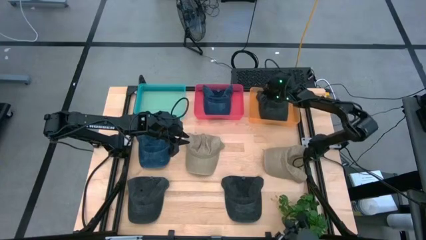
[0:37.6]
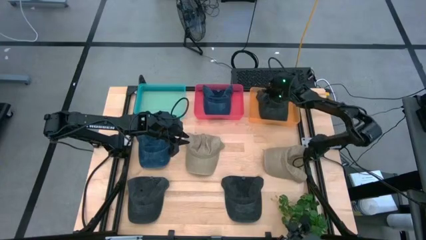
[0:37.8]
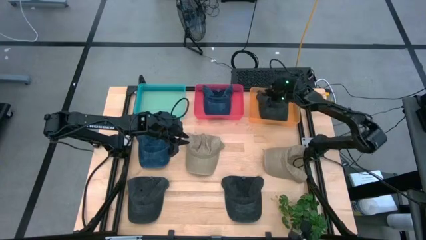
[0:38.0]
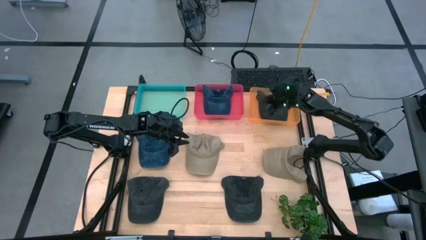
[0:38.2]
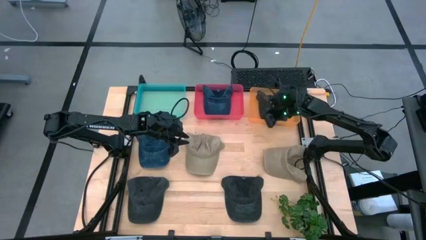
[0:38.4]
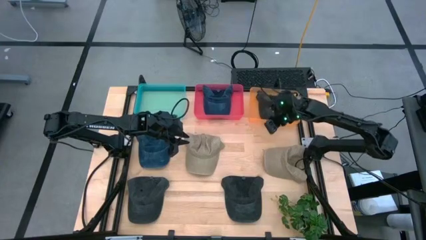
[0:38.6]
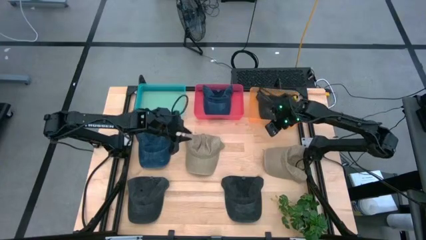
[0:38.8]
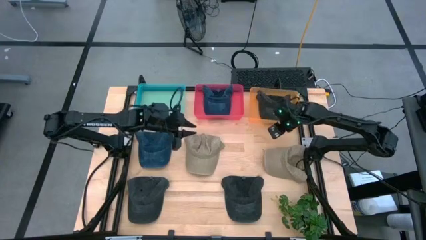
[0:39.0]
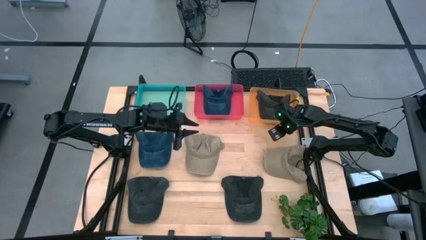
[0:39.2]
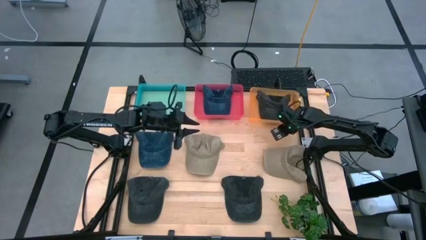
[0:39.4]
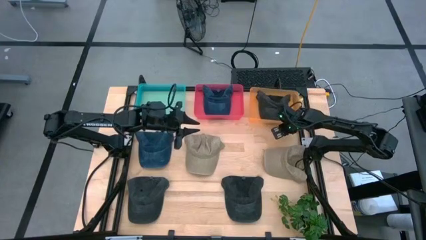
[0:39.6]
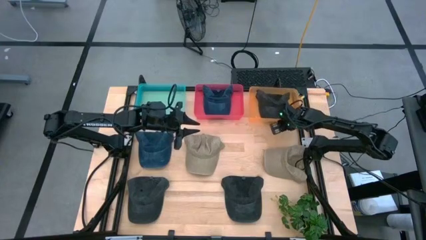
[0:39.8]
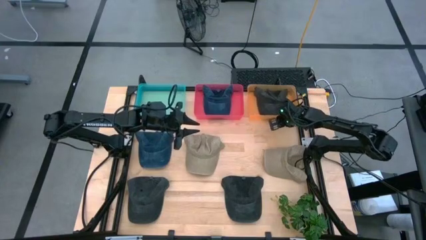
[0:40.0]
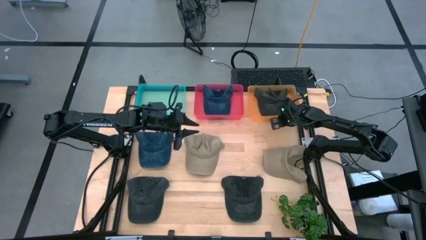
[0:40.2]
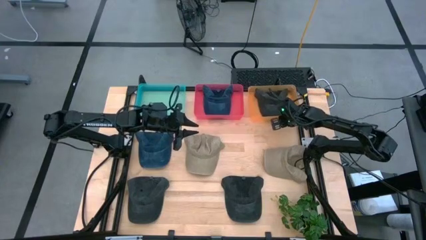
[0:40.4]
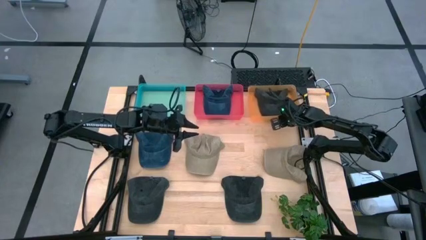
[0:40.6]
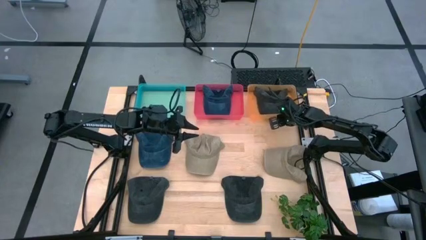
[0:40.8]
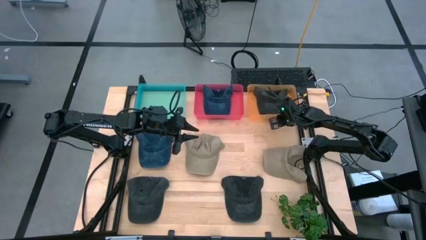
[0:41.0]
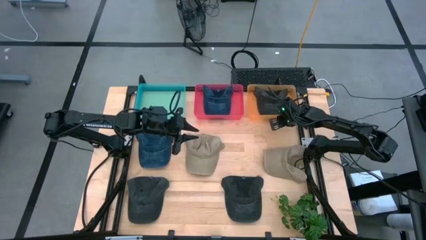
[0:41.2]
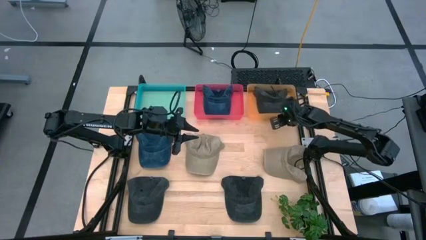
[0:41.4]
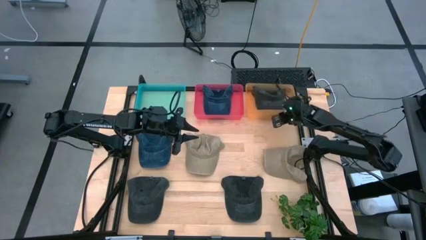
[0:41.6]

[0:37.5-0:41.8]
Task: Pick & Place hat
Adjust the orange bin

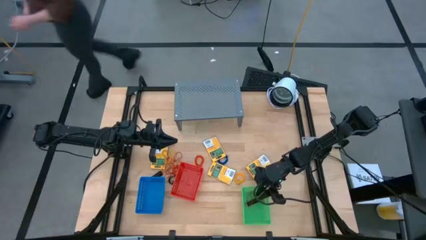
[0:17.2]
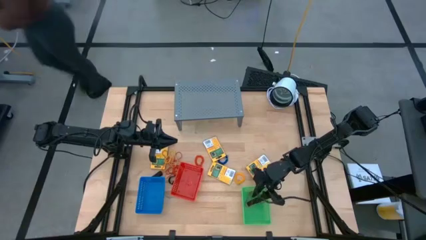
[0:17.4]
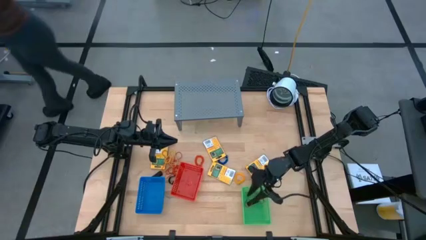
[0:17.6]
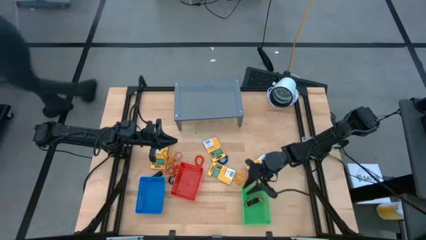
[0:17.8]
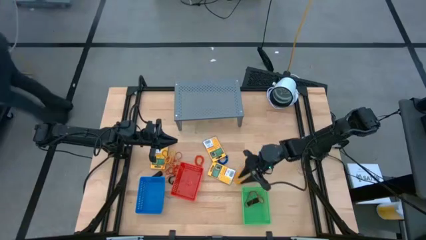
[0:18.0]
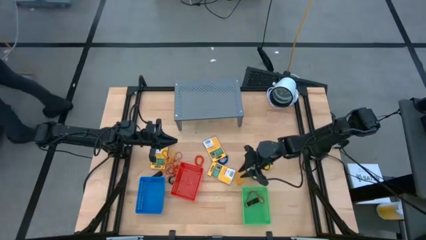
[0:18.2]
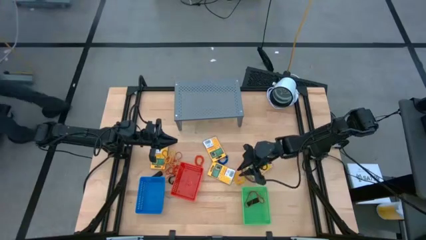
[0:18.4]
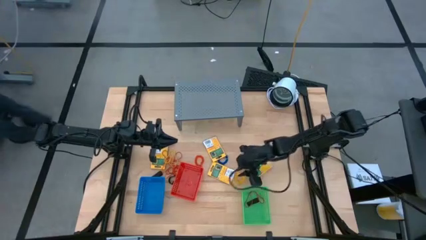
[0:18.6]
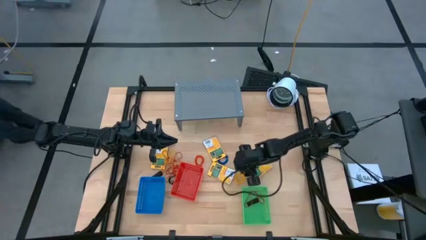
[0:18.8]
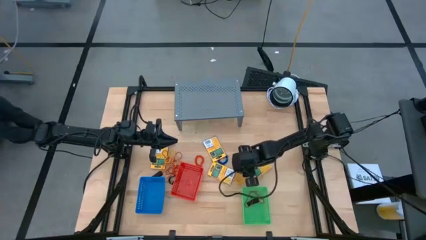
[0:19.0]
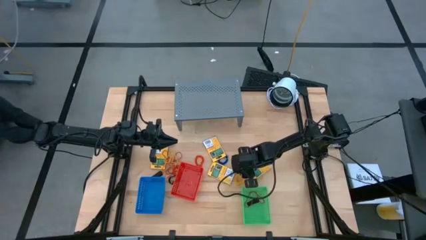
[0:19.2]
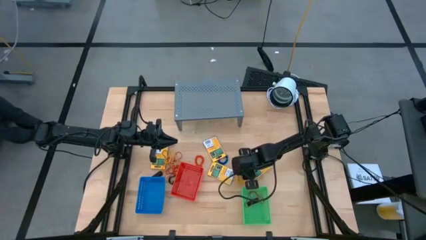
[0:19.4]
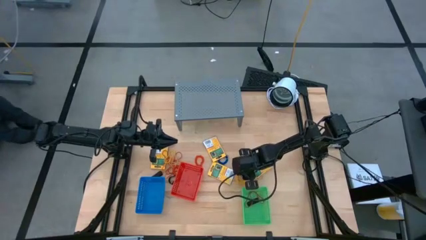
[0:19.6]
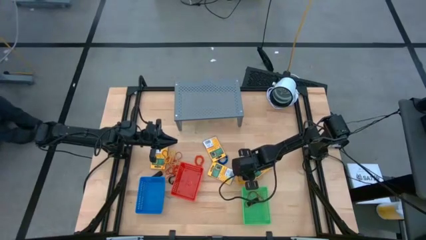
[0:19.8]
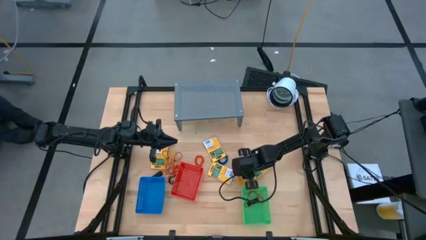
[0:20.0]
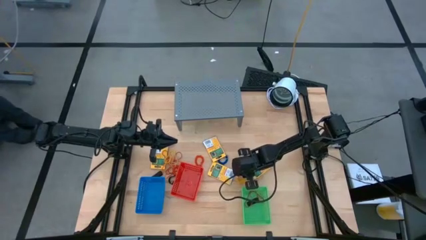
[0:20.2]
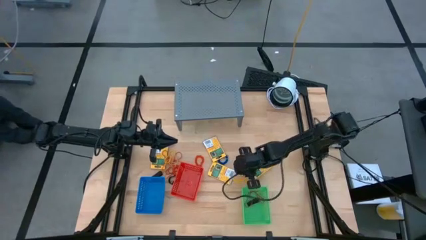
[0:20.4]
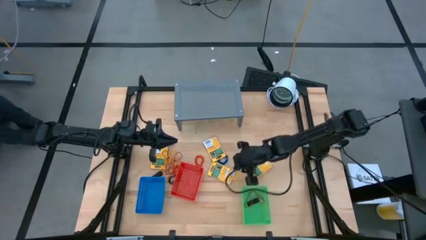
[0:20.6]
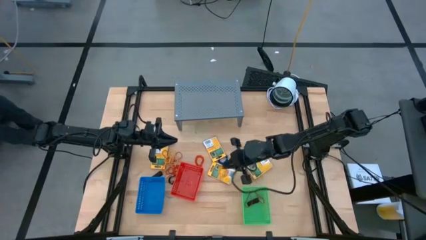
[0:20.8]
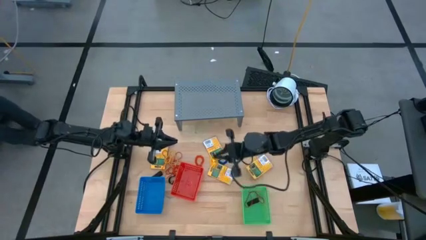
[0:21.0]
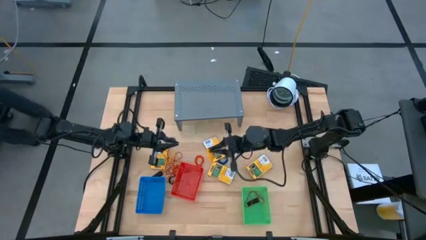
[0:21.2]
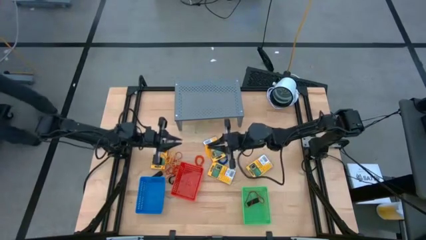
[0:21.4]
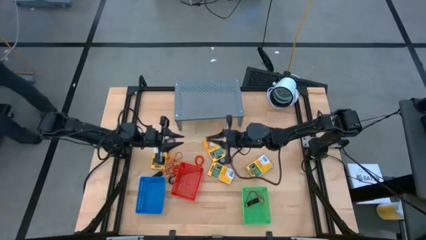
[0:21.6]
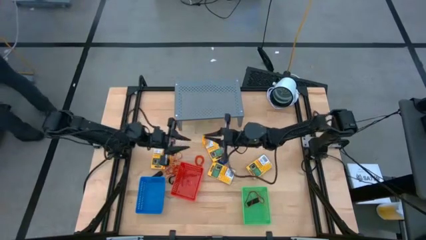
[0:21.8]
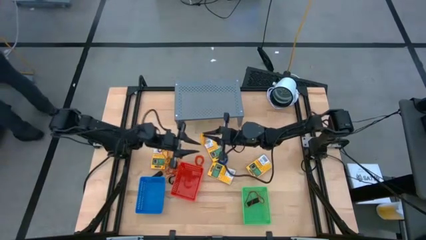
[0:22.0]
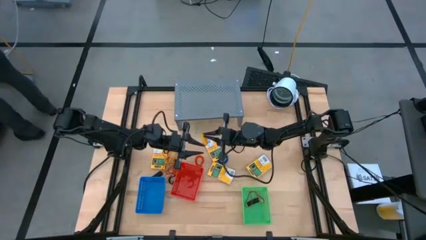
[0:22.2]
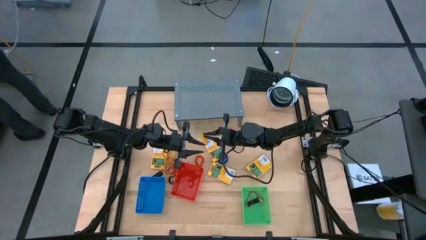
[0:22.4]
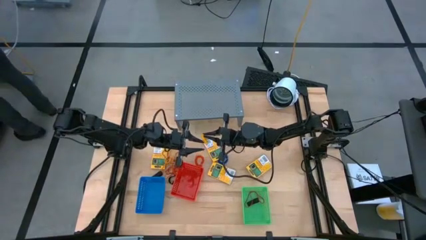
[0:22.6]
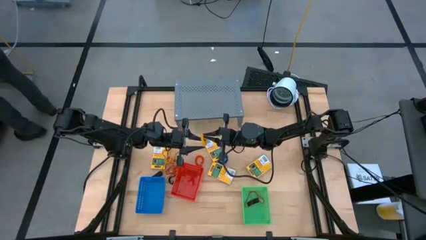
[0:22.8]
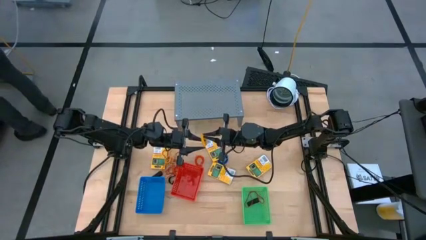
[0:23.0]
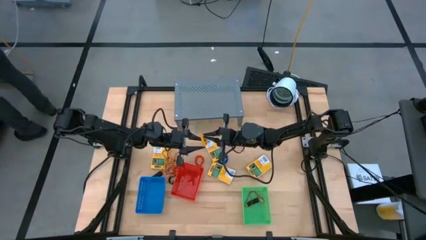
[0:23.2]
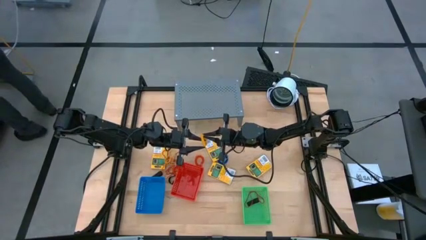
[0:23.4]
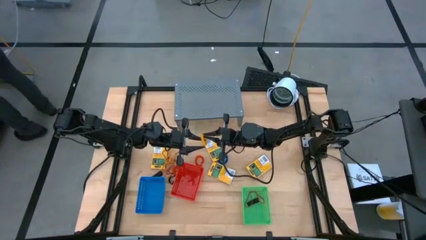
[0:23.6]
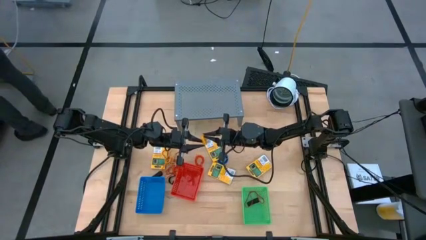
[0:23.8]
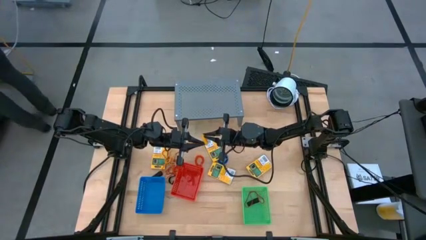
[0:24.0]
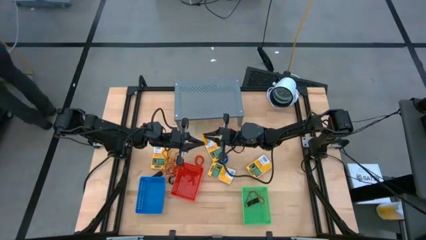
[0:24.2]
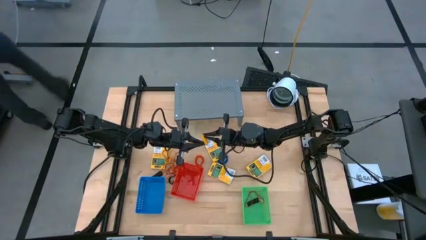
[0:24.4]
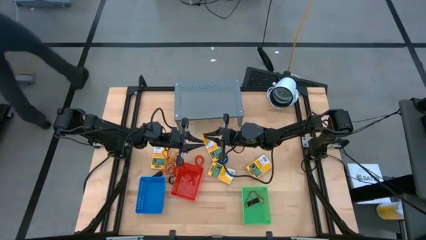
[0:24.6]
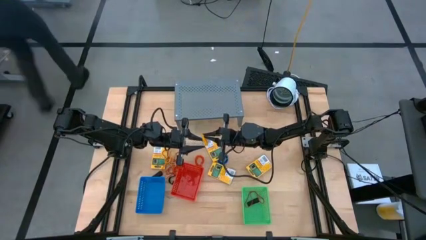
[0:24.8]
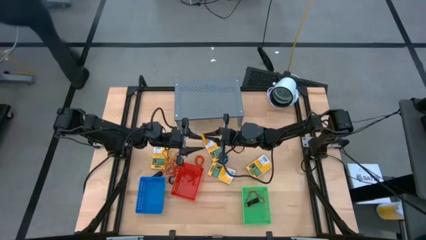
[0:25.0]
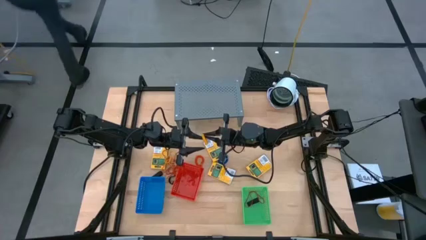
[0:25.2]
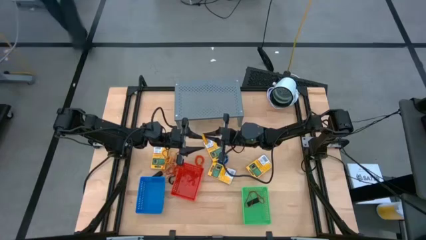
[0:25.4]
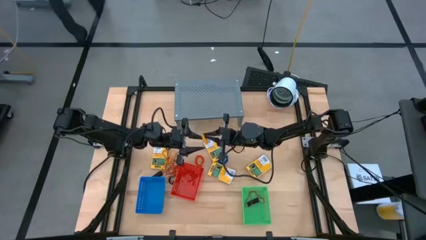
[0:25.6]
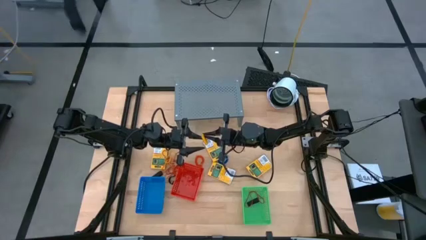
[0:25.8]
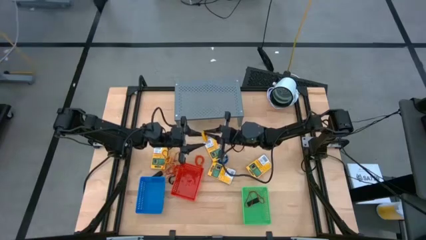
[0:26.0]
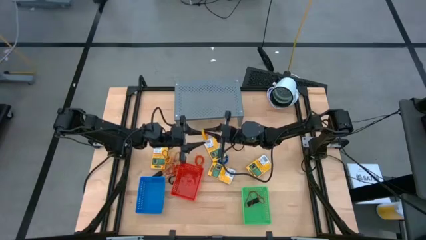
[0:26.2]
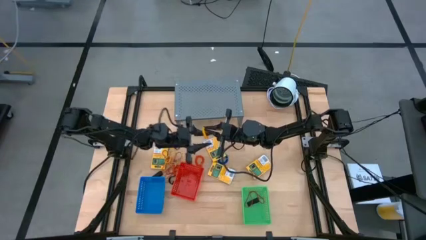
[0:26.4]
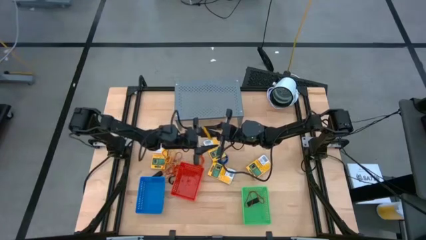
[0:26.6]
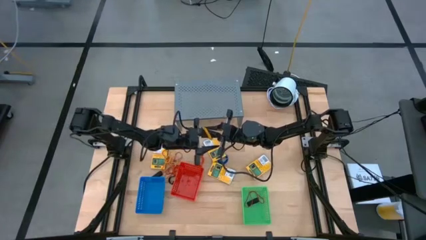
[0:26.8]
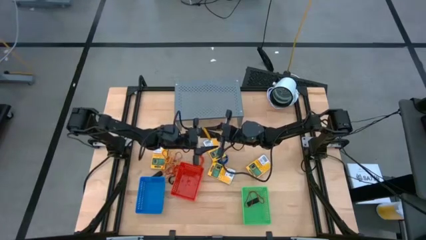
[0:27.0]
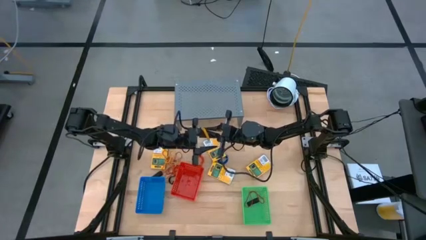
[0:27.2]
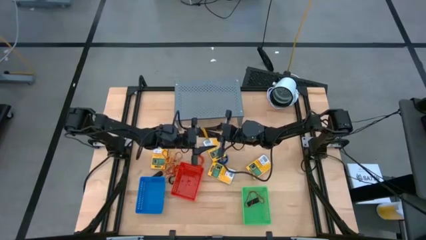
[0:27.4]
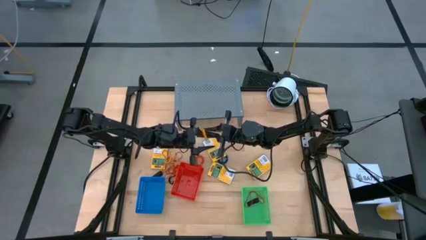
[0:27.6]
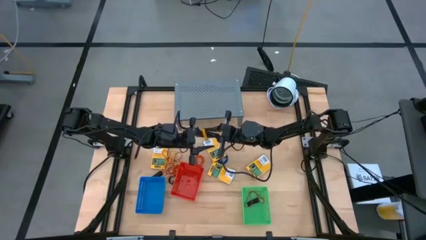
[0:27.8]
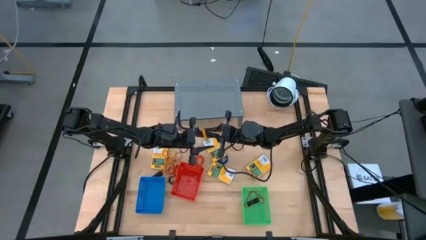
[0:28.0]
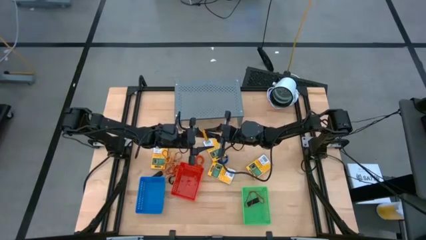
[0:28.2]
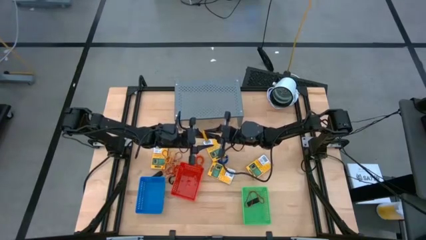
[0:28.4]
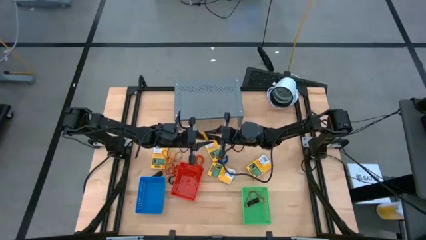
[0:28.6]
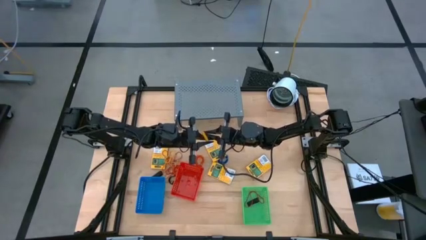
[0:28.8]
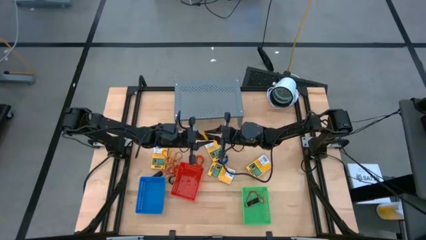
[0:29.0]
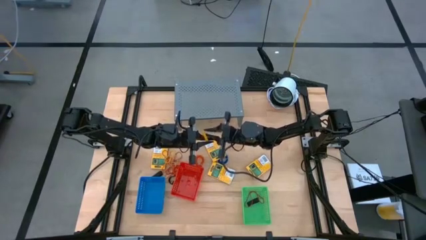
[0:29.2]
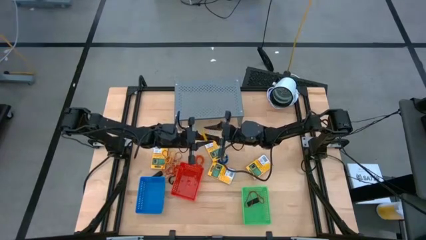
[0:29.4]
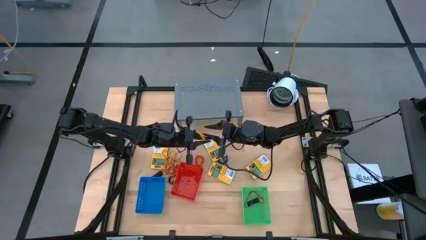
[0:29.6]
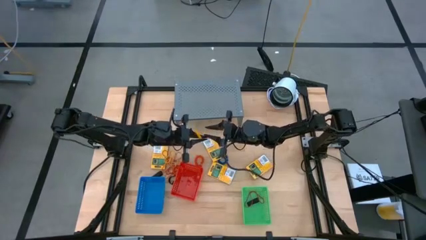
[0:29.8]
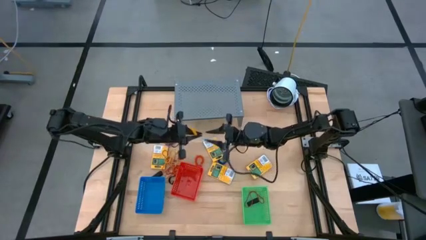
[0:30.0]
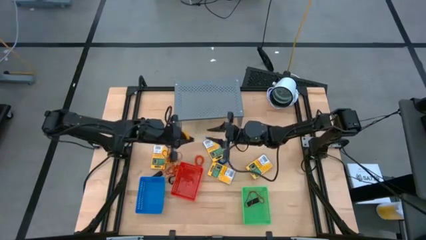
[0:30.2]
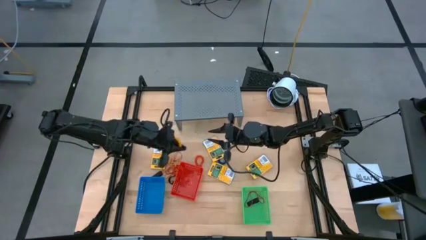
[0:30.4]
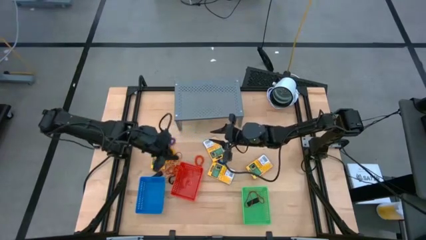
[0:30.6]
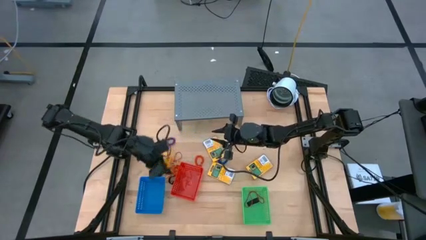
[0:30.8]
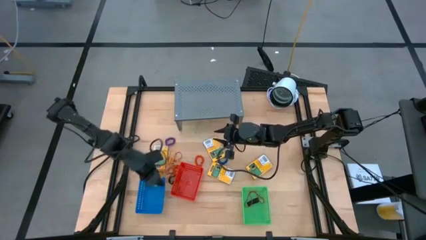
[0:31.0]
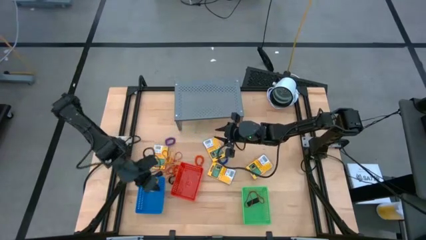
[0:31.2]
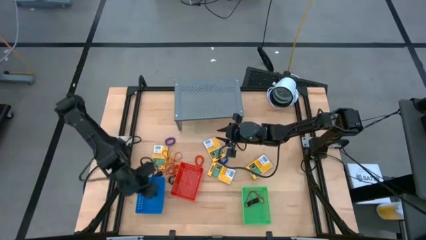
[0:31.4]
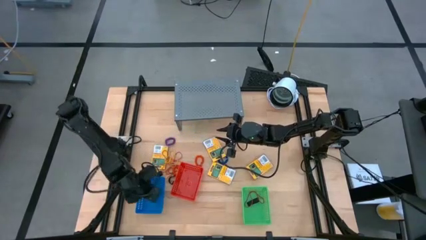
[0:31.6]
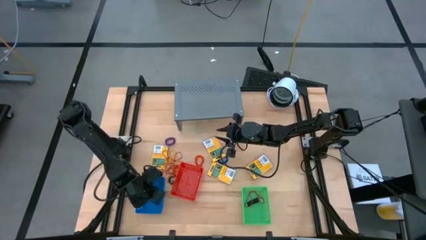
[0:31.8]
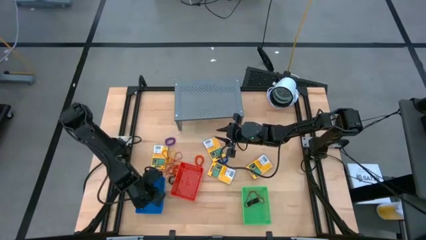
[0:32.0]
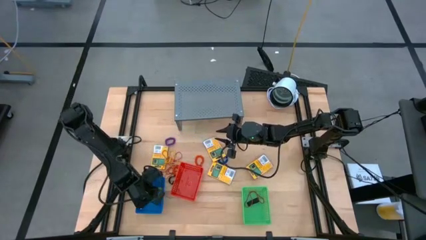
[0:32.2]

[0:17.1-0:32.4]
Task: Pick & Place Office Desk Supplies
Put the yellow spring keychain into the blue basket
